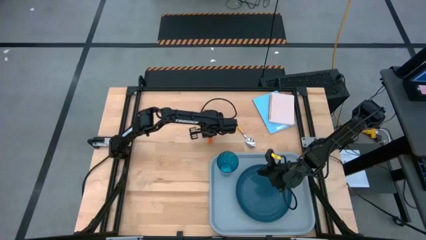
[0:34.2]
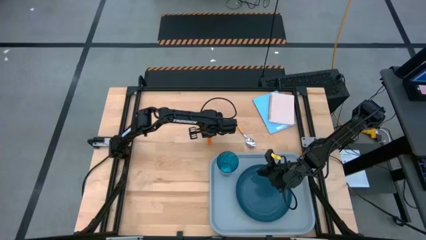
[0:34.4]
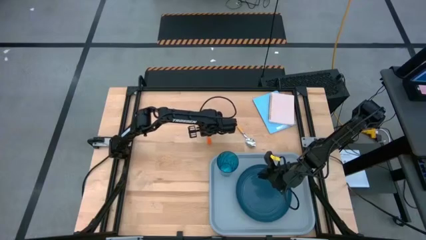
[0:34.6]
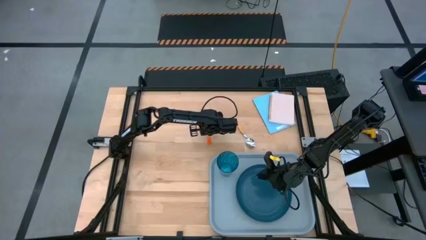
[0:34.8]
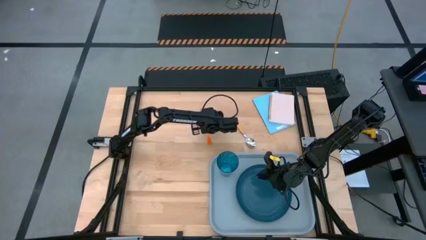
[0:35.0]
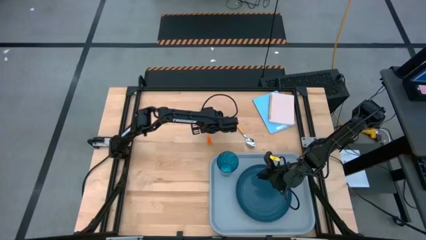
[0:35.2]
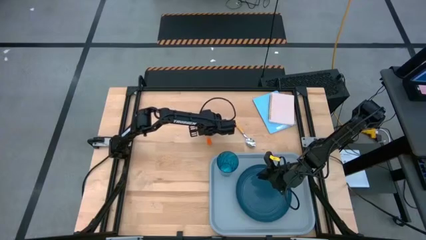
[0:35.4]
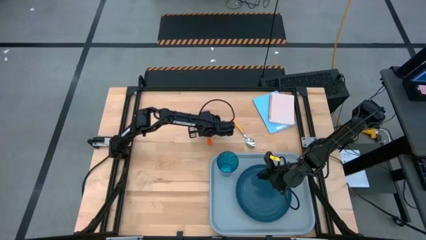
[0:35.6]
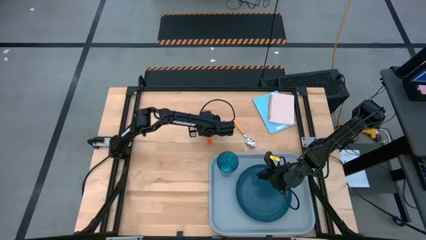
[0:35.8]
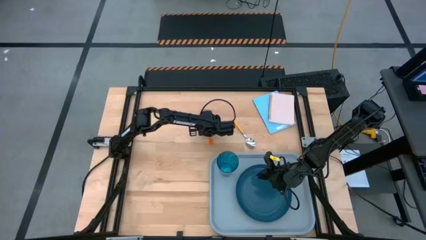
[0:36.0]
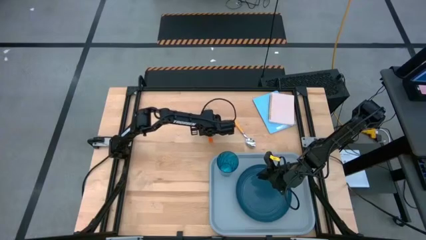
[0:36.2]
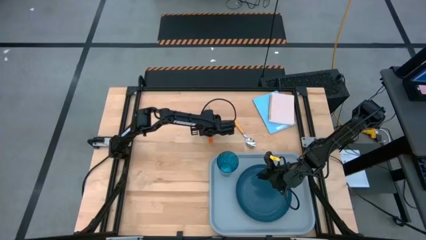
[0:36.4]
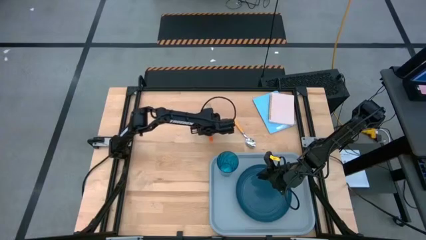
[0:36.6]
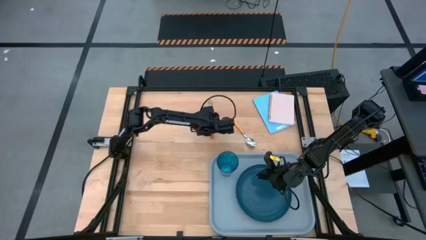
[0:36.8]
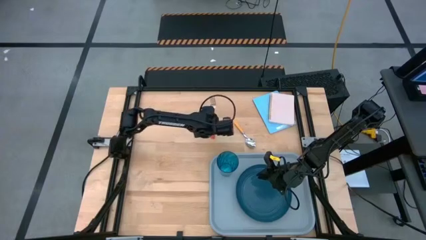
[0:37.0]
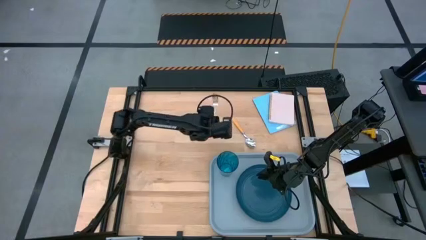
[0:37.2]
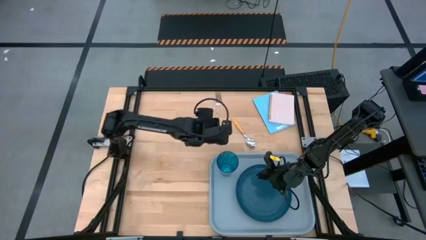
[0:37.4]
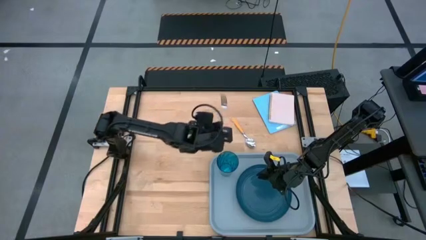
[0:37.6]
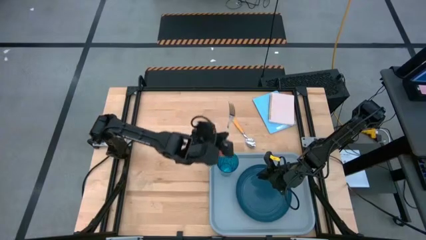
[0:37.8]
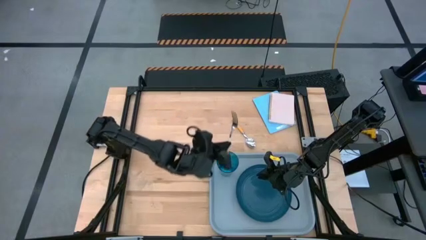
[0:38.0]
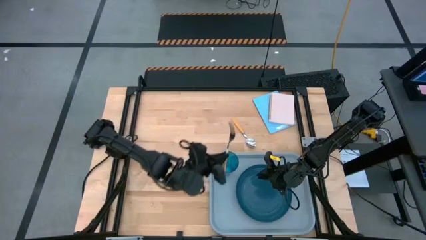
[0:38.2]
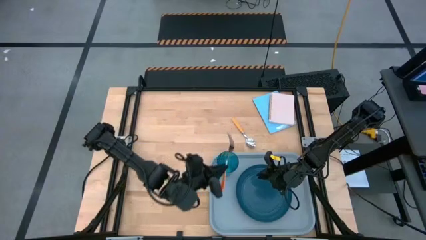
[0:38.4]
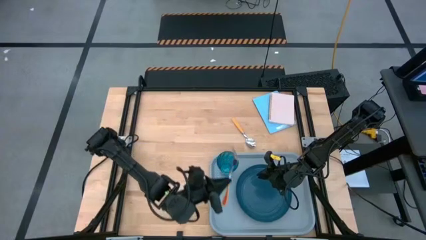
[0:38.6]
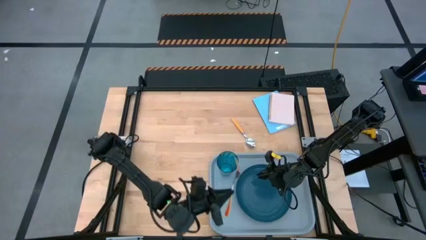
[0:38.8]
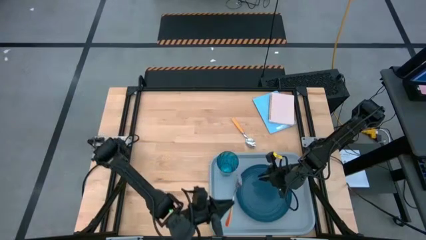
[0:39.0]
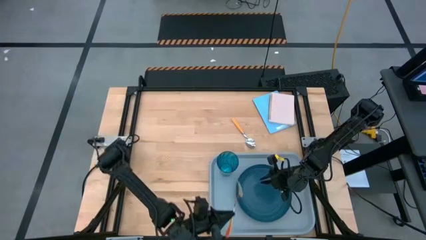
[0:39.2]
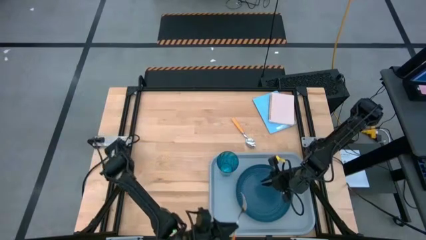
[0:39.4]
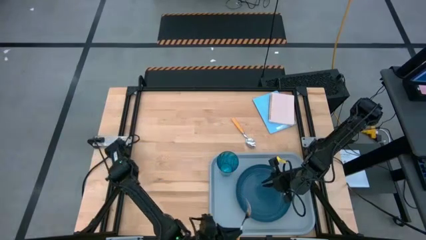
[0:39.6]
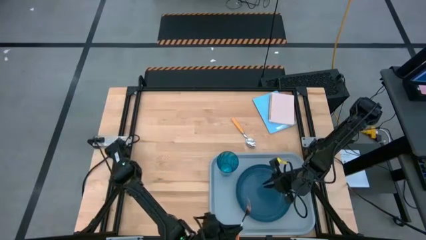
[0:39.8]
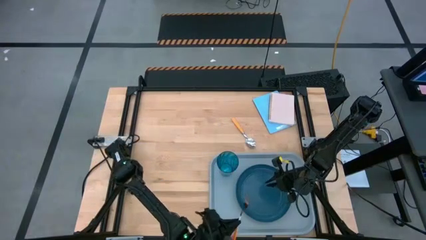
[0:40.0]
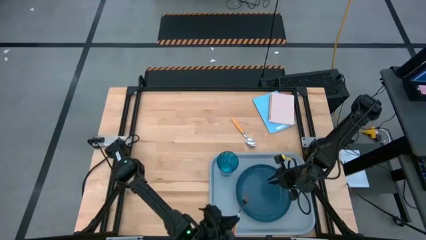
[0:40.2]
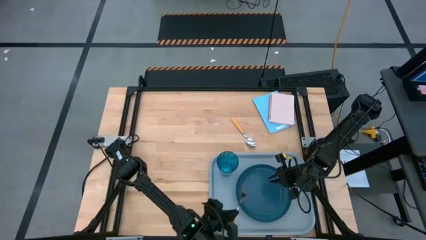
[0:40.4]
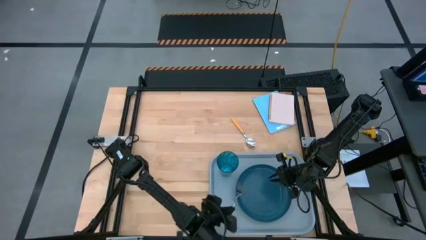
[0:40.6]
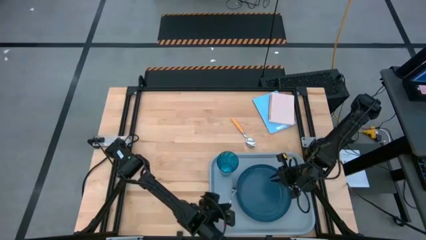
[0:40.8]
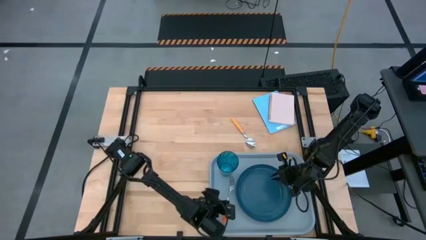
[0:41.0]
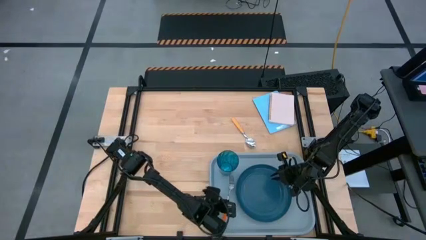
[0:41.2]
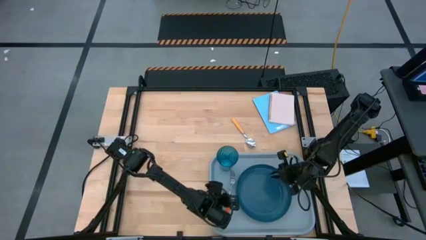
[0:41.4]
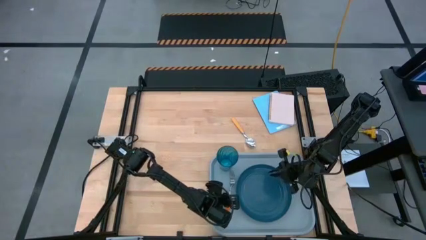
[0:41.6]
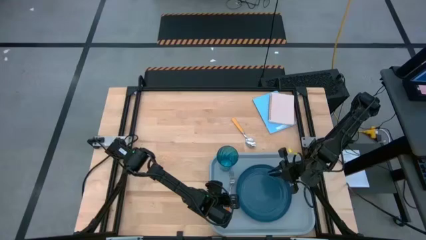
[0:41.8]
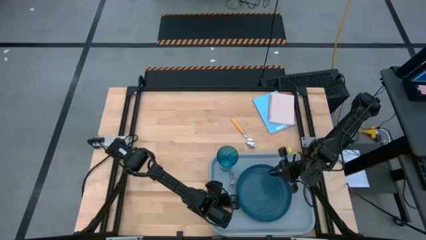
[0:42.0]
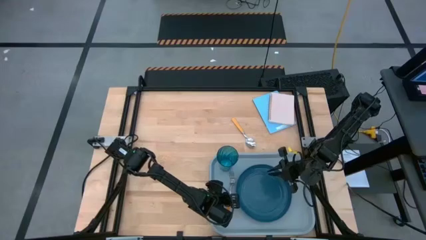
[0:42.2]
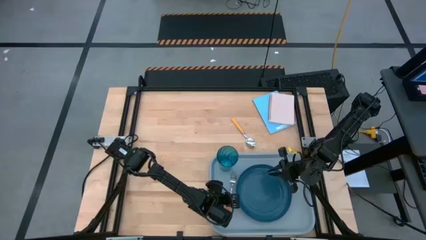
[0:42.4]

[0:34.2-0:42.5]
Task: Pick and place plate/cup/fork/spoon on tray
Put the orange fork on the gray tray to the left of the blue plate

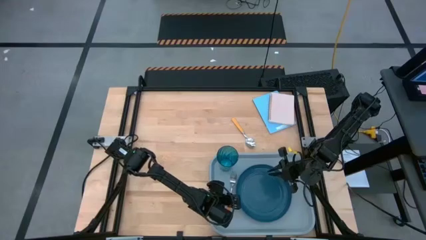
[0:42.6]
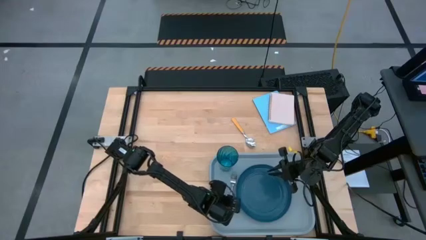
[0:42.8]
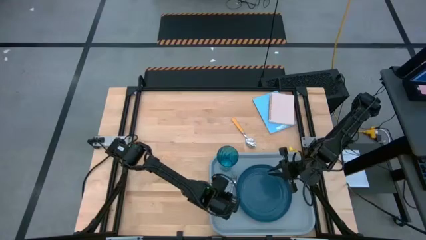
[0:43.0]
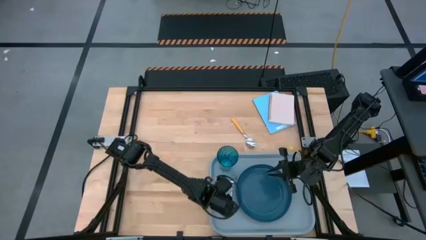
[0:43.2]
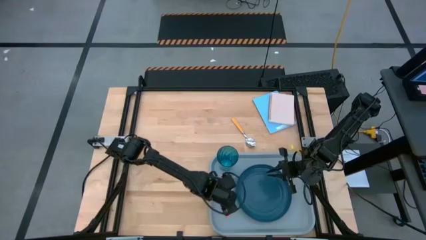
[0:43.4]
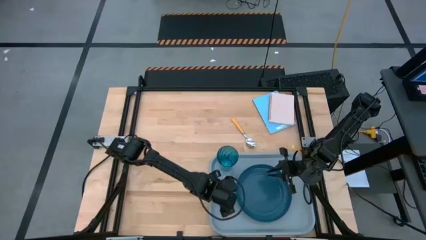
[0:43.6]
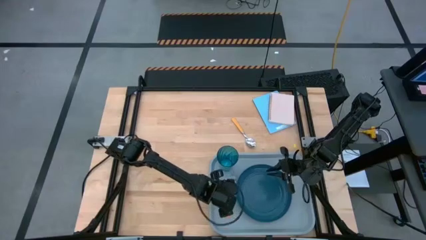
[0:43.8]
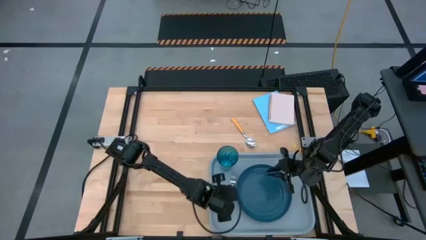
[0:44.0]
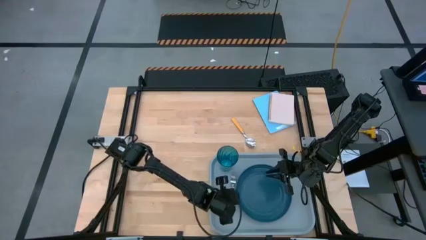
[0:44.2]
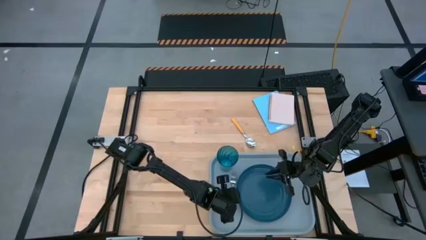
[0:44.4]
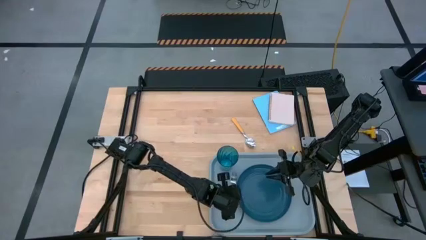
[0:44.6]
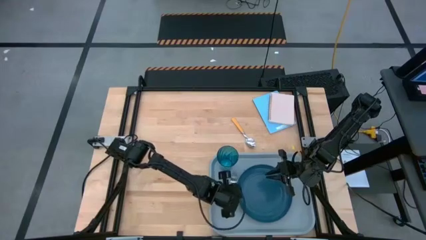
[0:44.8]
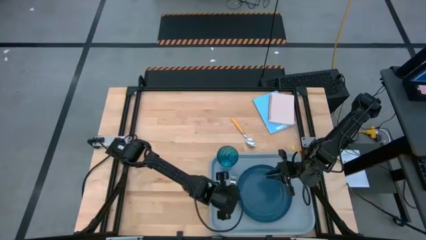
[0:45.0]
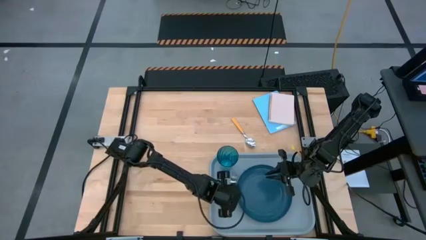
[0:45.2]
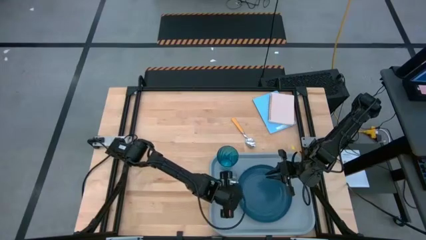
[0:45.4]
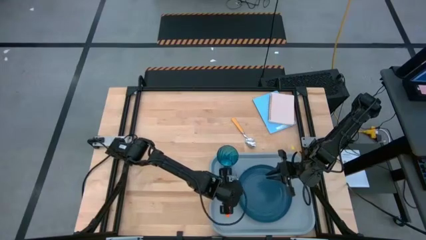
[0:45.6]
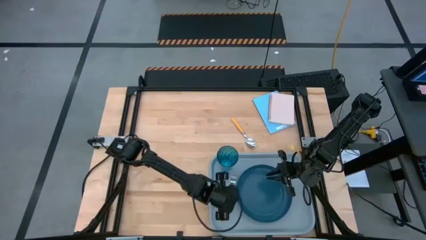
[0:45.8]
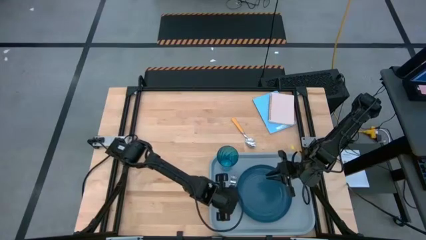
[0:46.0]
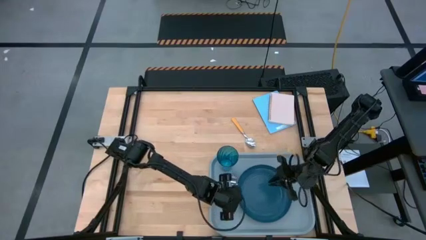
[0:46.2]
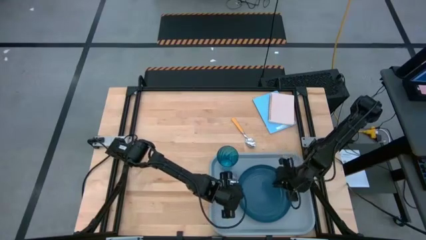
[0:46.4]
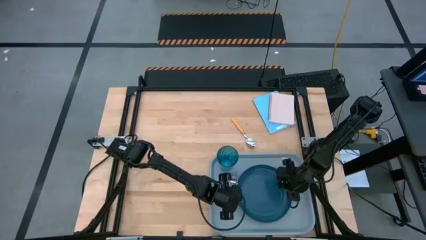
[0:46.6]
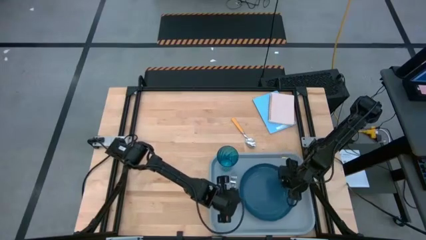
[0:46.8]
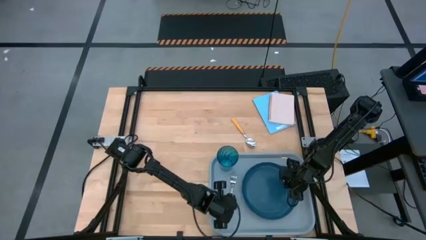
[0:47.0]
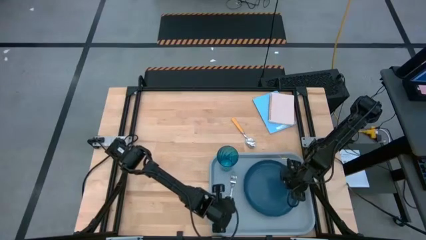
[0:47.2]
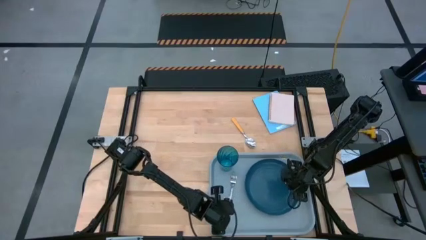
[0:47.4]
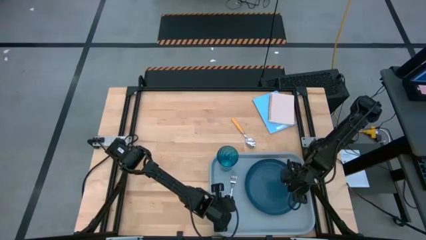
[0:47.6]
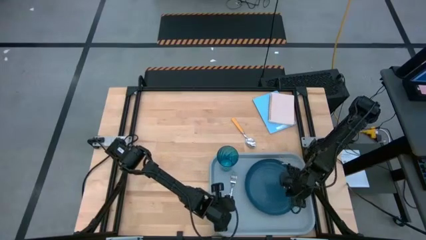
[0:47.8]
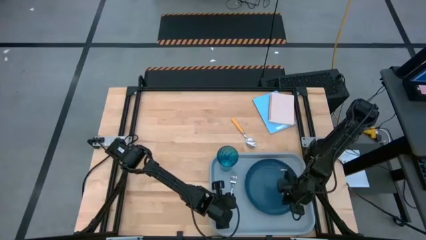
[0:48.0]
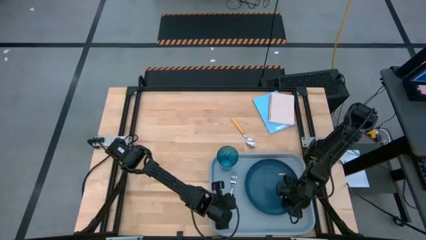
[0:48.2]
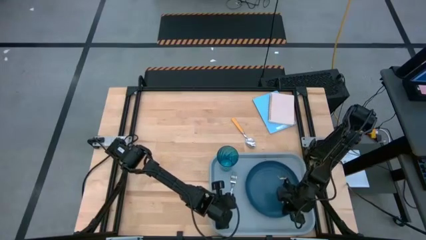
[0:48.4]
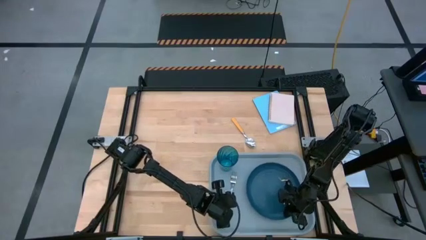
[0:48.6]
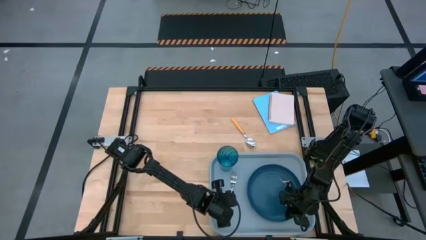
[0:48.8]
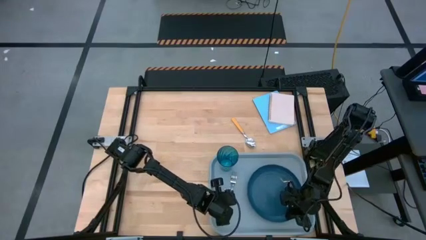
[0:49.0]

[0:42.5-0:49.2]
Adjust the blue plate and the fork on the gray tray

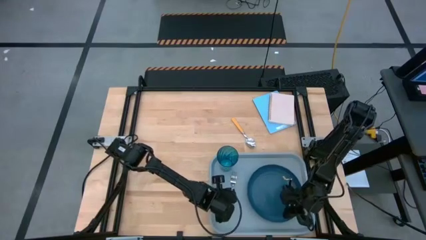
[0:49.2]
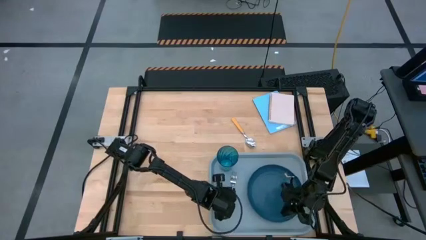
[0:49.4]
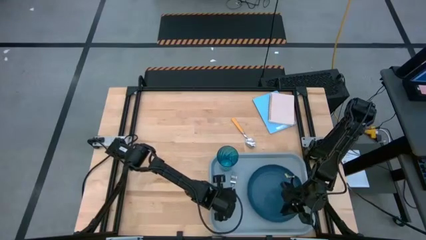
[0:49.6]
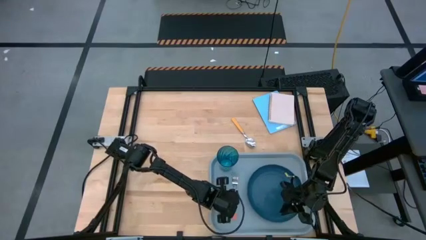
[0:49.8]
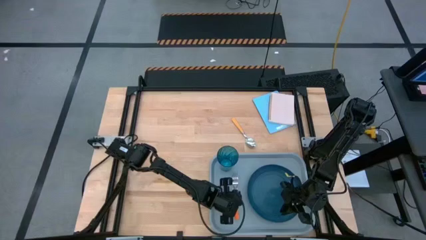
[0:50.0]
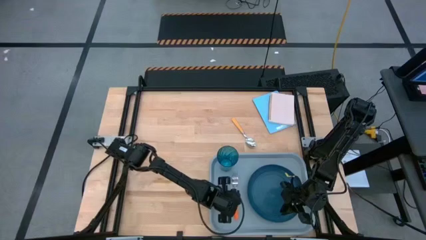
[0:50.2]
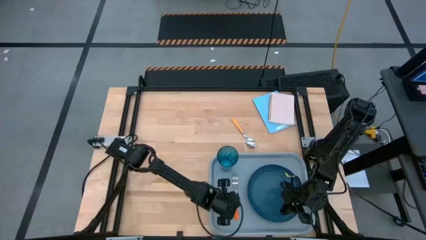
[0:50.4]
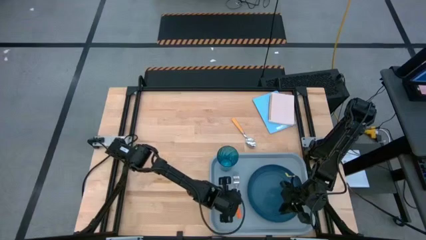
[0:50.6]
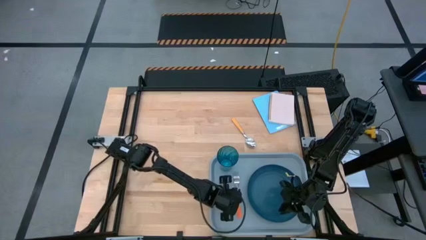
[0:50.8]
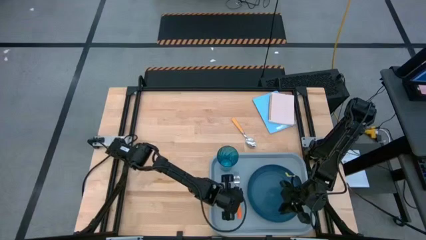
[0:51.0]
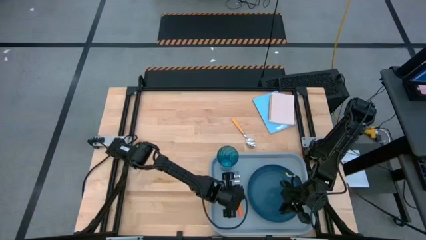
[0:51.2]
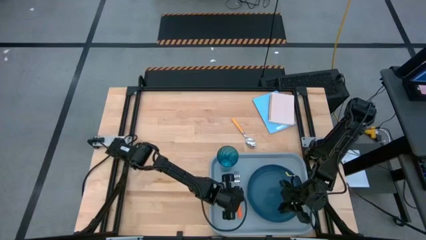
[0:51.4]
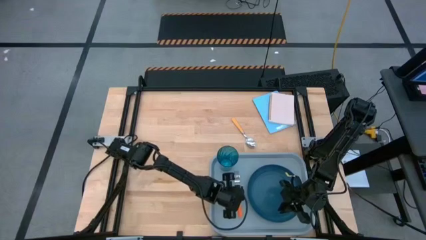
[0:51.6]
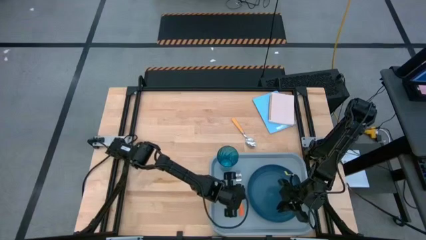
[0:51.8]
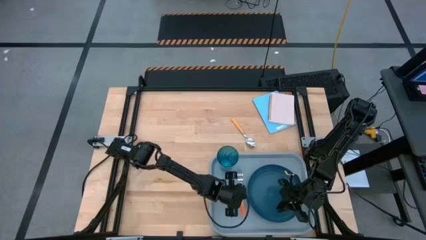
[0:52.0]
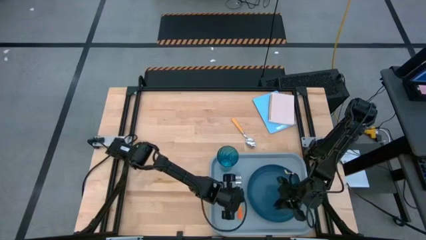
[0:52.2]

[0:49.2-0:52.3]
Adjust the orange fork
